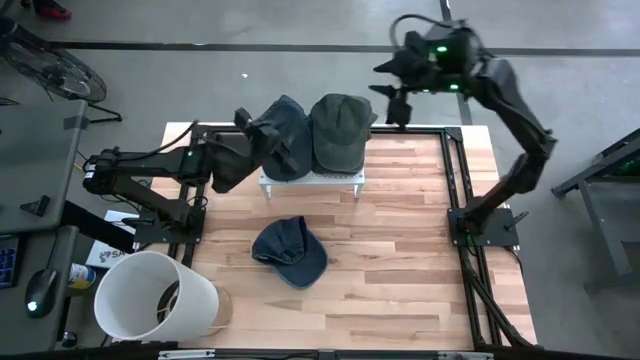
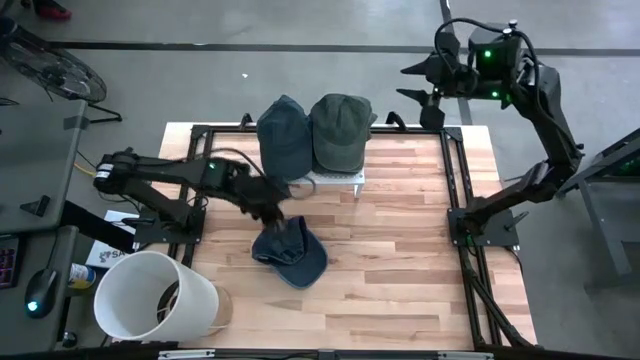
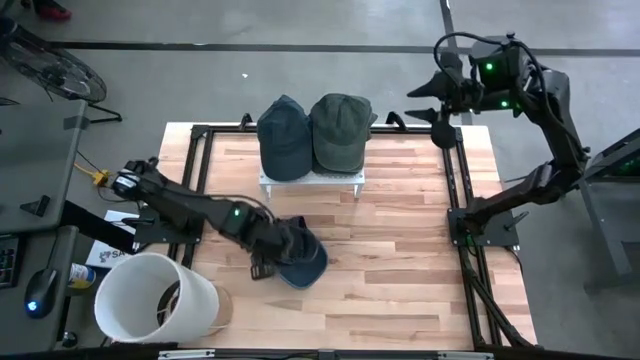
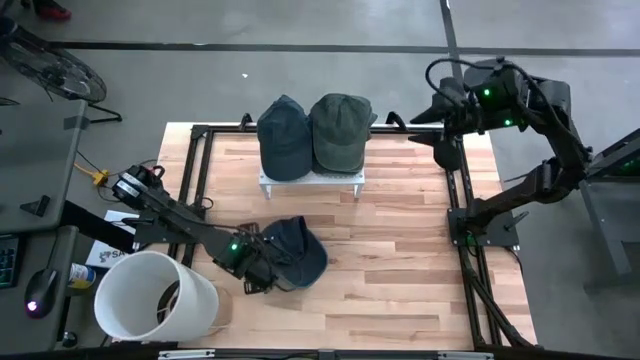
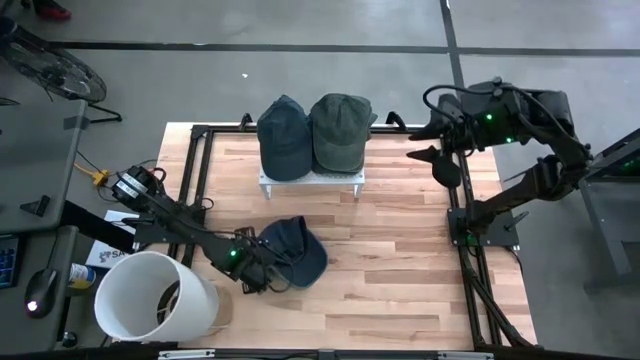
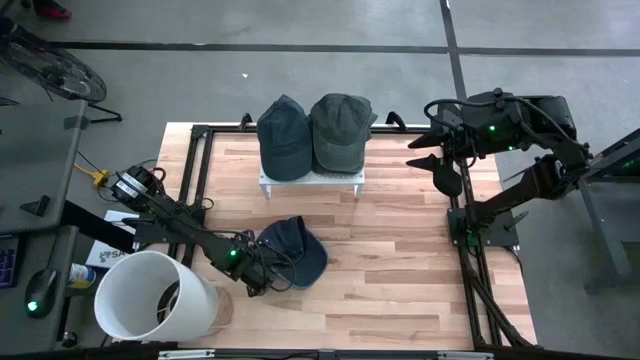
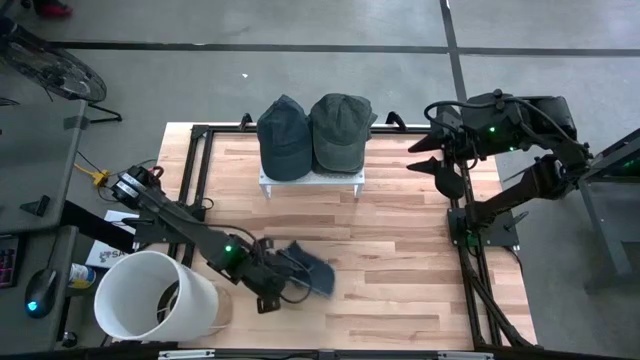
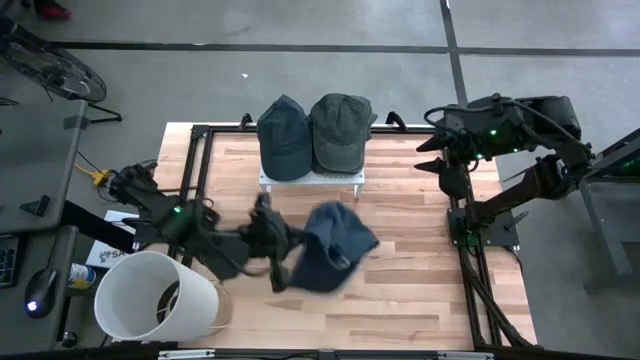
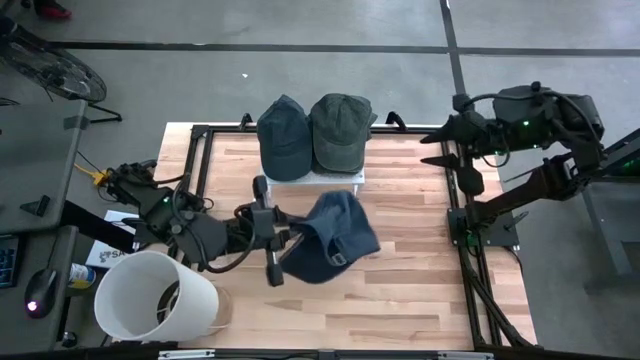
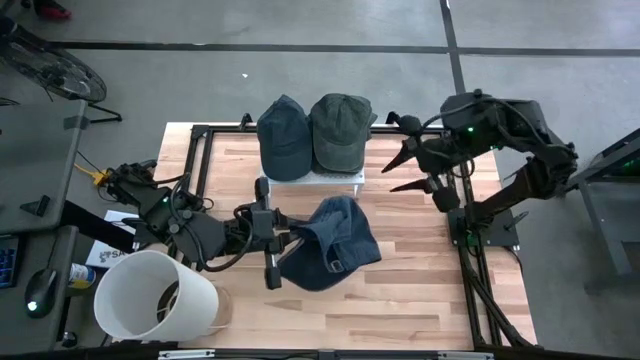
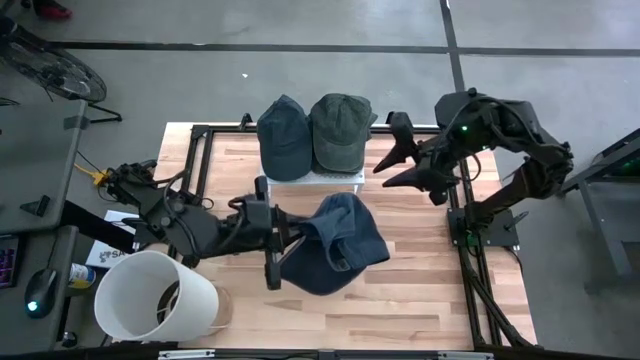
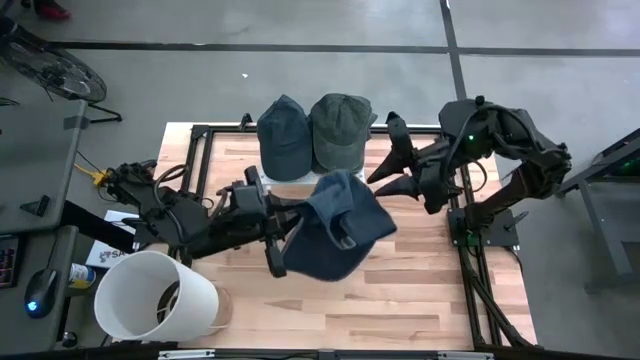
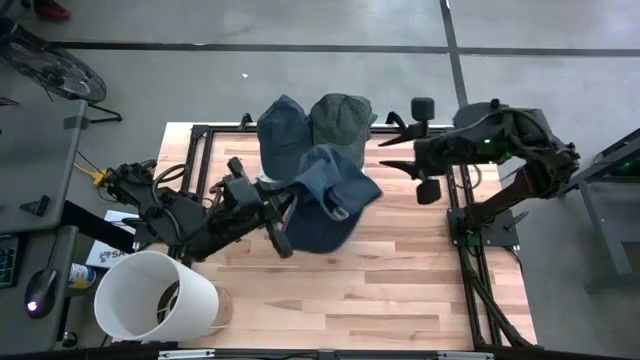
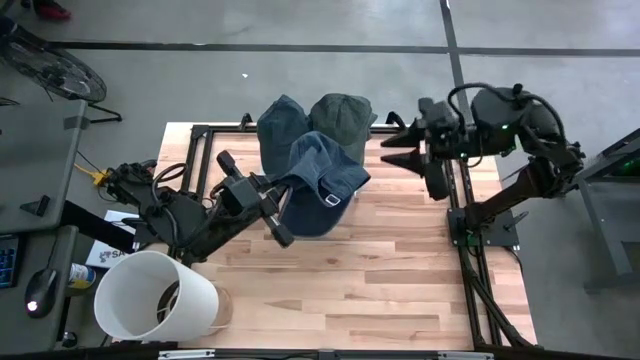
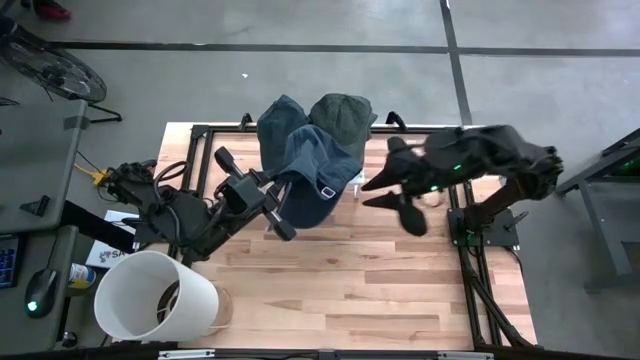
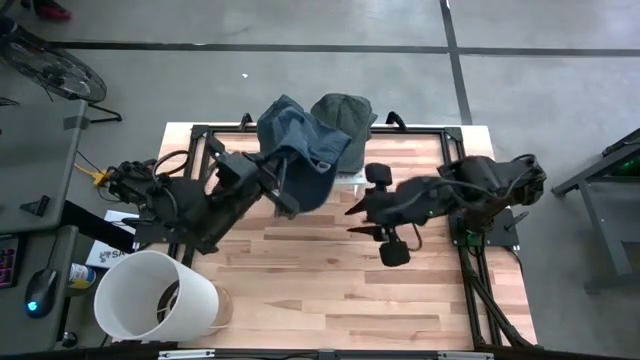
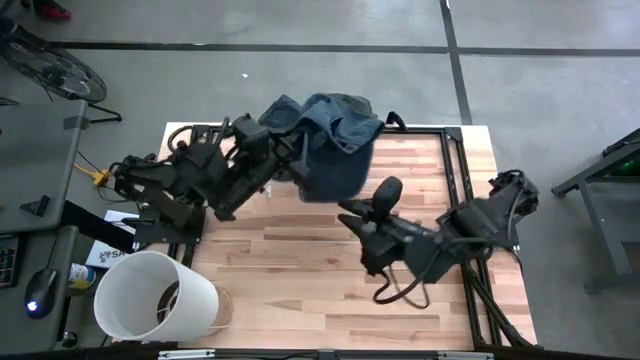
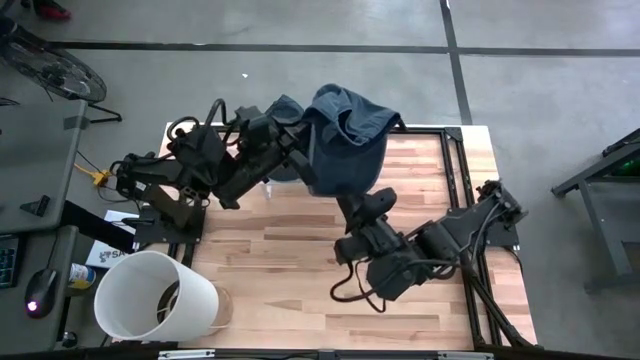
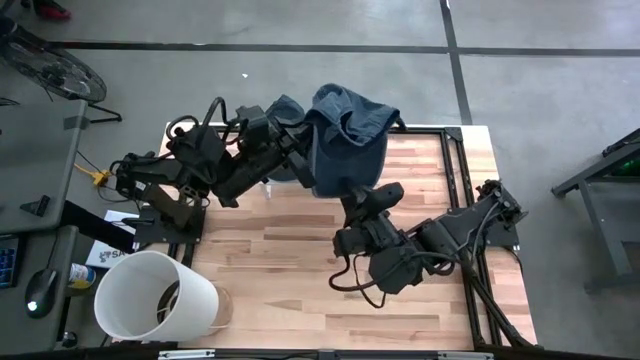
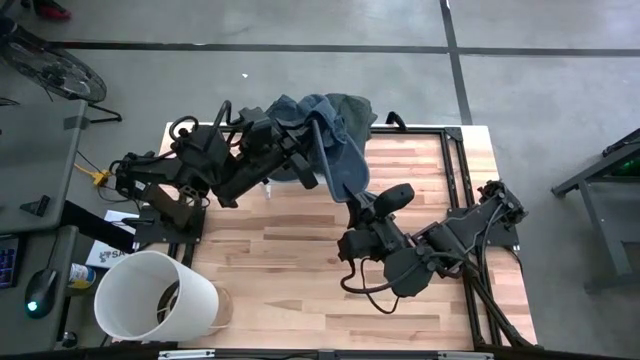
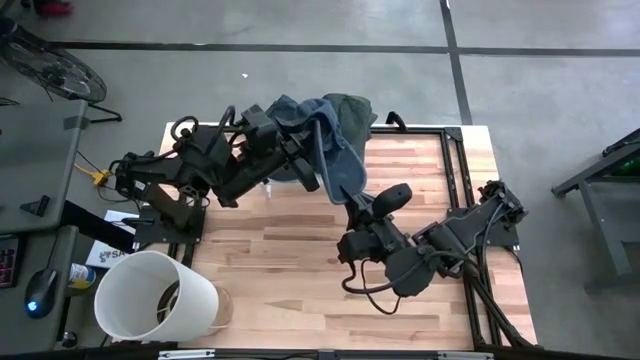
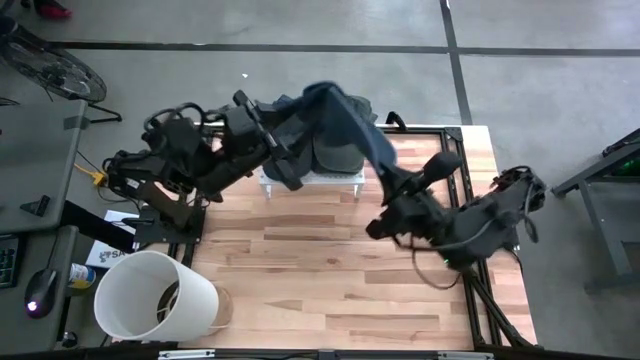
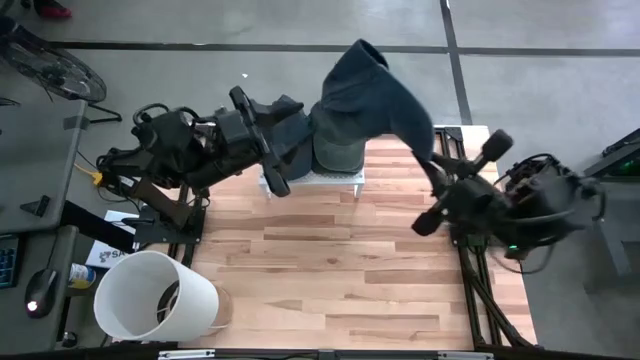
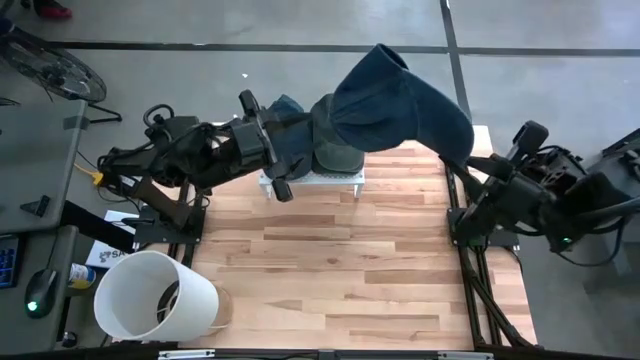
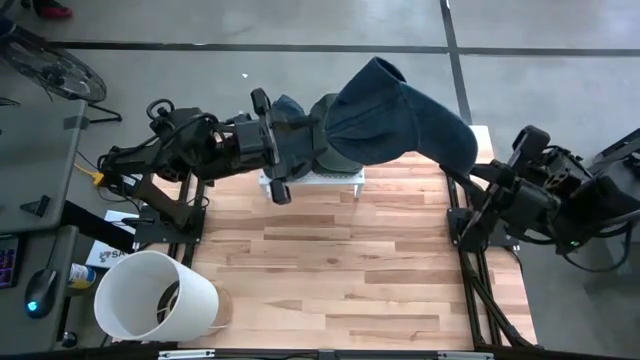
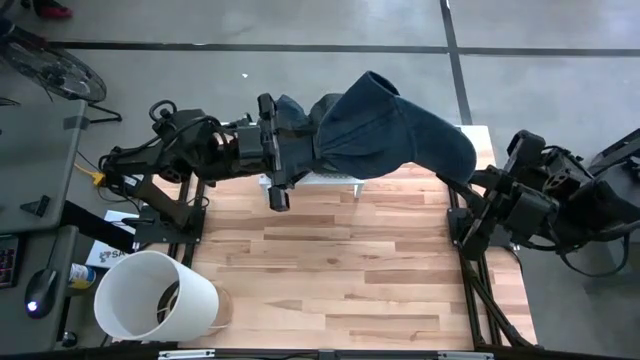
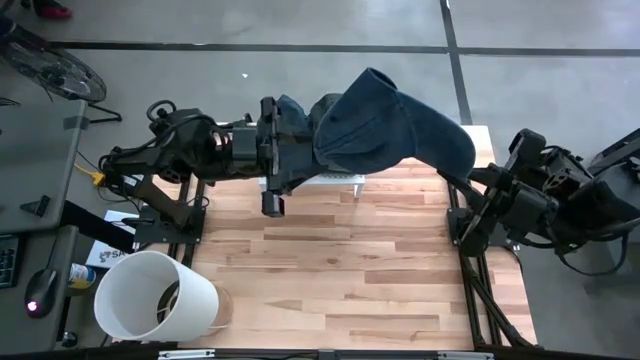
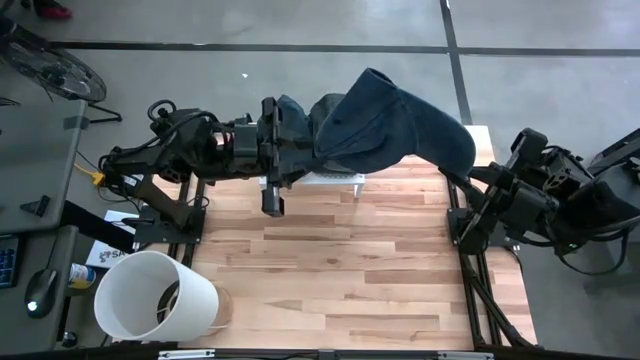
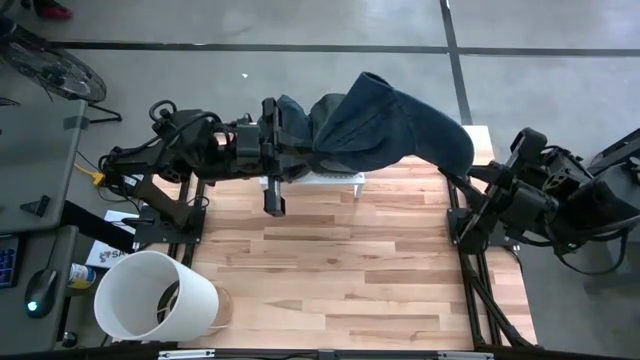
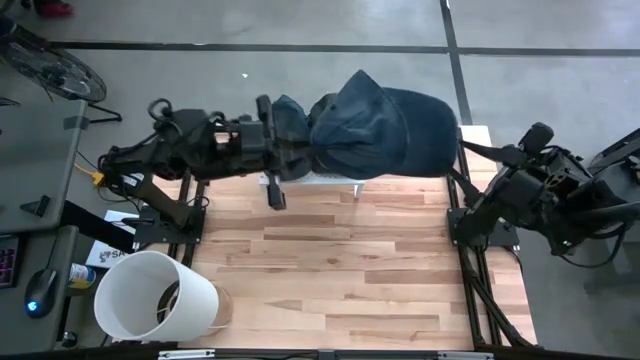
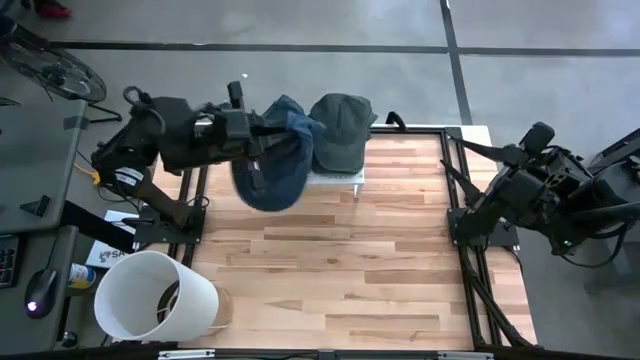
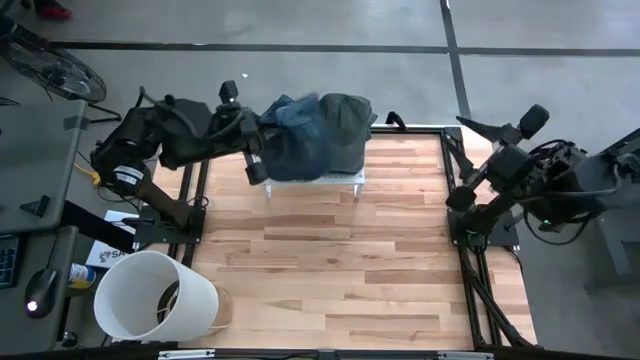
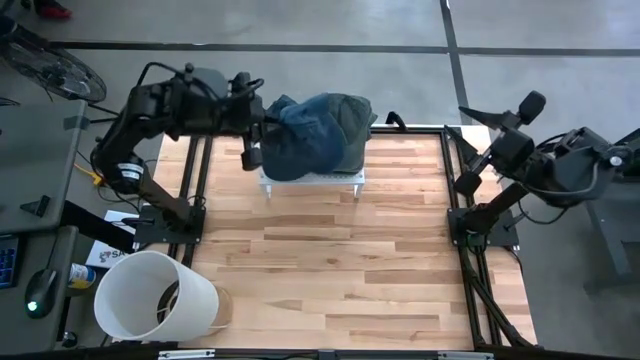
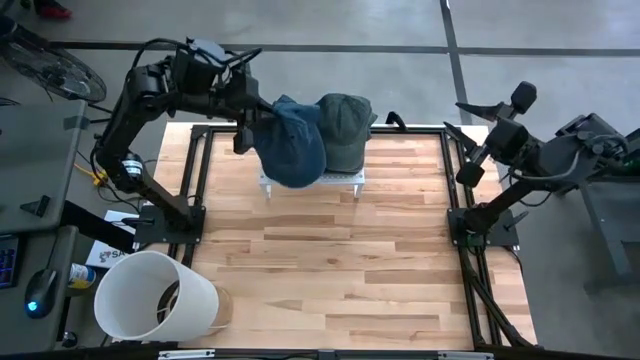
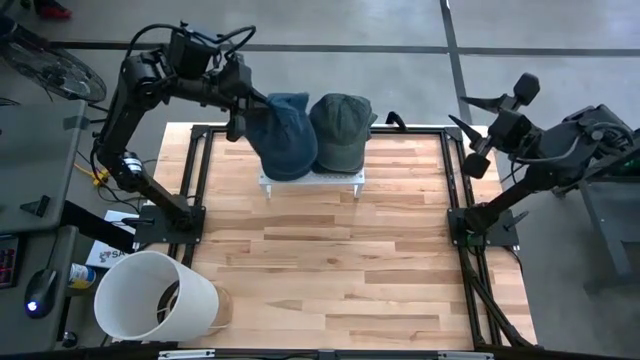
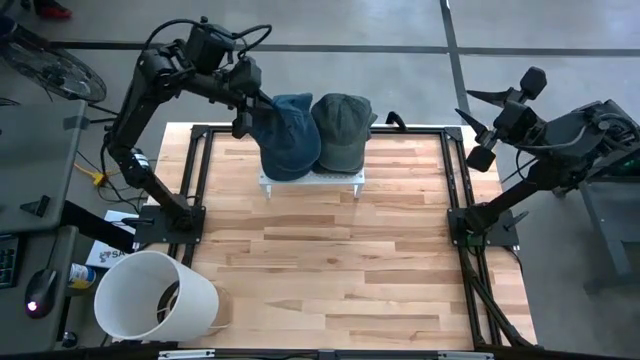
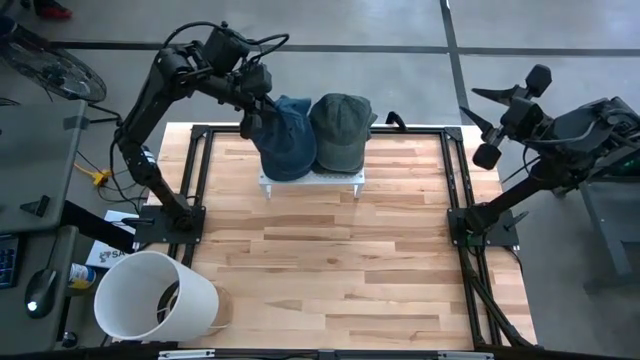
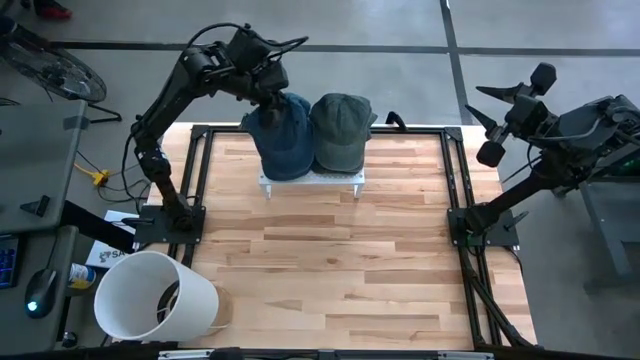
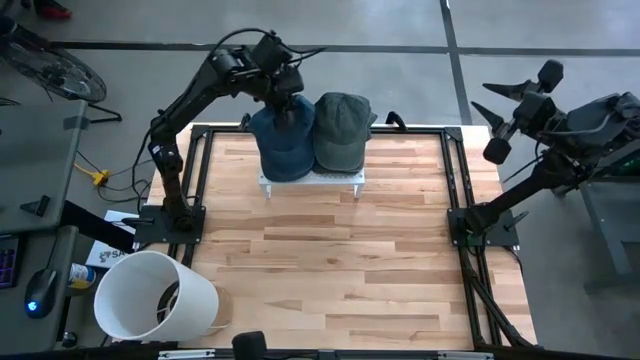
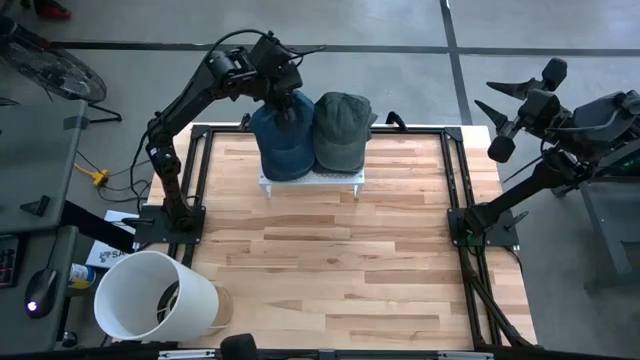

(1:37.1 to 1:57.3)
Task: Pick & Place hat
Stack the blue cap on top of the other blue cap on the shelf
